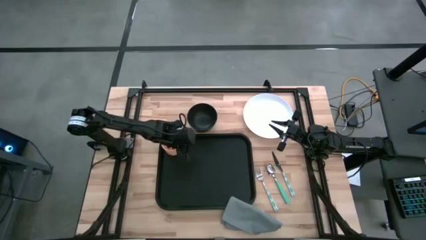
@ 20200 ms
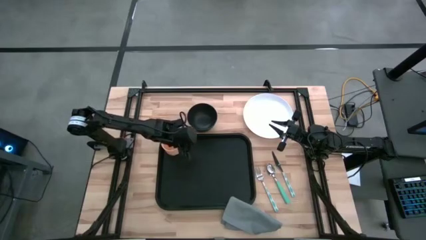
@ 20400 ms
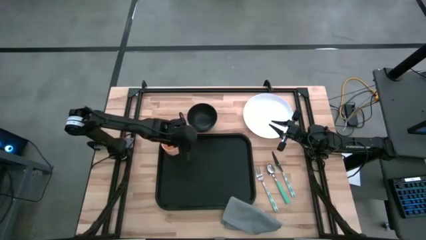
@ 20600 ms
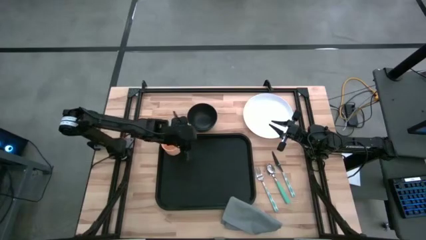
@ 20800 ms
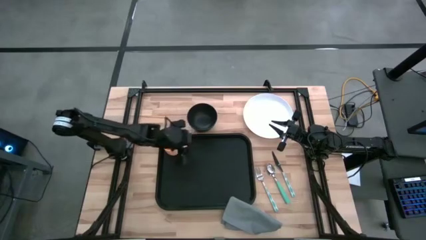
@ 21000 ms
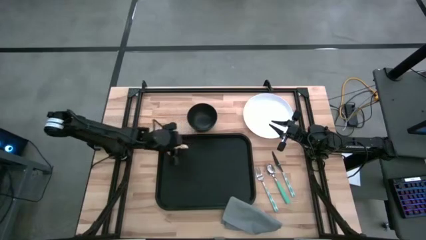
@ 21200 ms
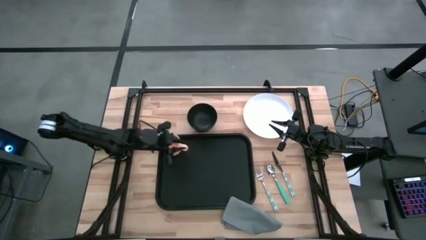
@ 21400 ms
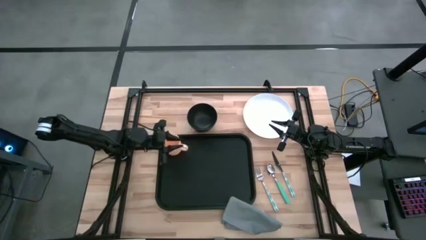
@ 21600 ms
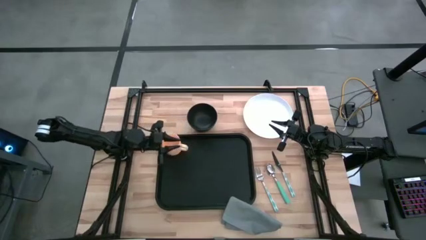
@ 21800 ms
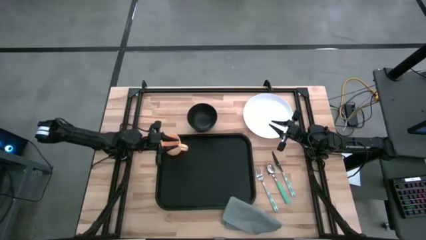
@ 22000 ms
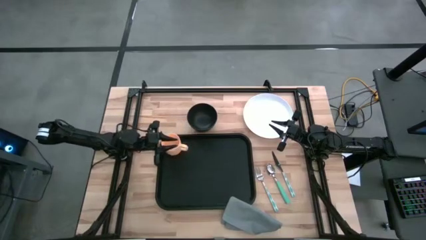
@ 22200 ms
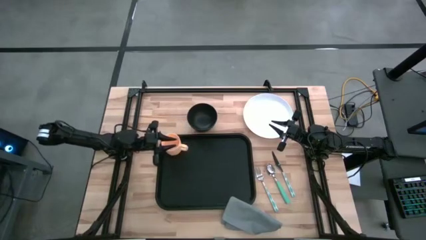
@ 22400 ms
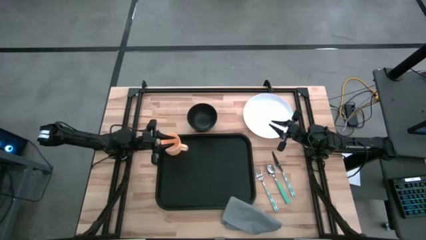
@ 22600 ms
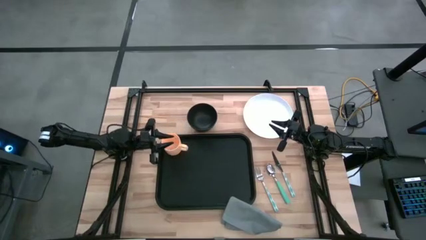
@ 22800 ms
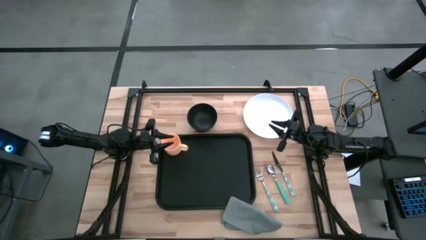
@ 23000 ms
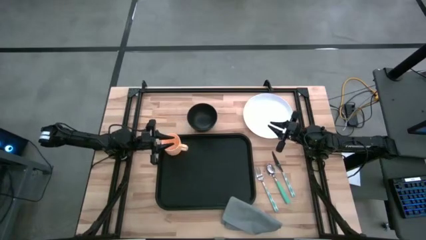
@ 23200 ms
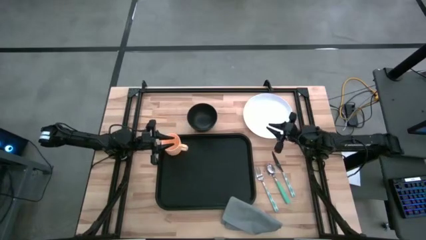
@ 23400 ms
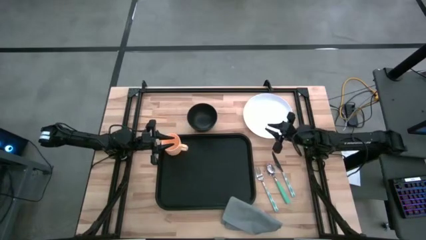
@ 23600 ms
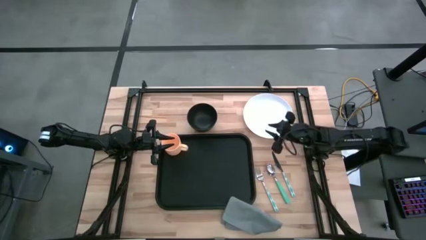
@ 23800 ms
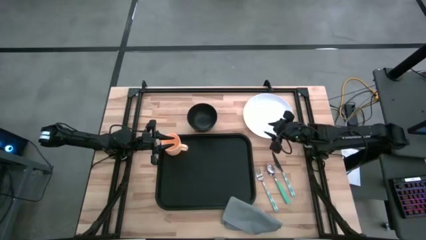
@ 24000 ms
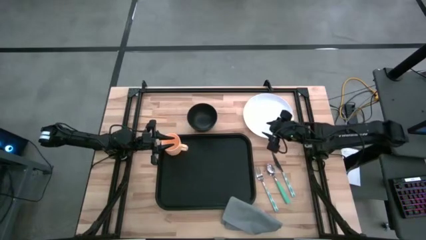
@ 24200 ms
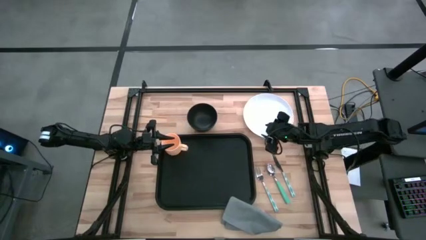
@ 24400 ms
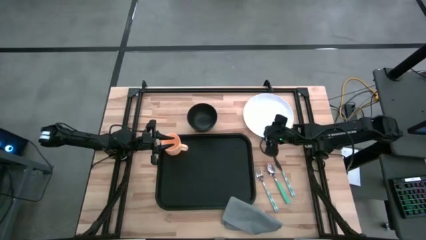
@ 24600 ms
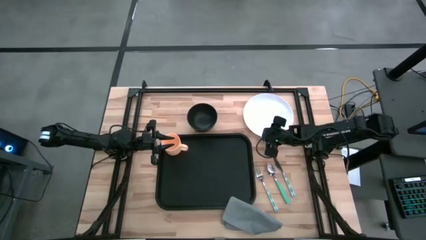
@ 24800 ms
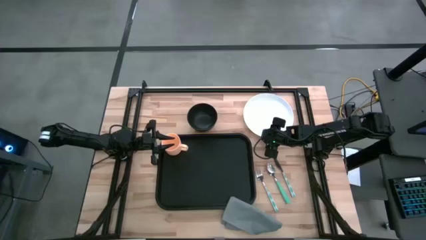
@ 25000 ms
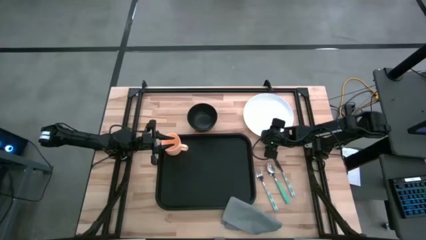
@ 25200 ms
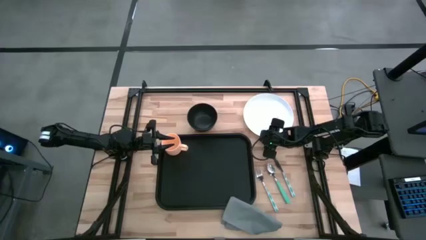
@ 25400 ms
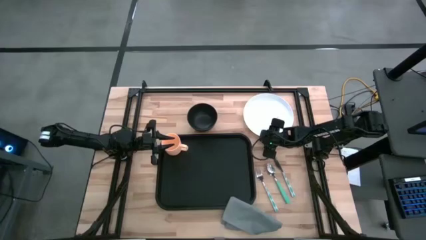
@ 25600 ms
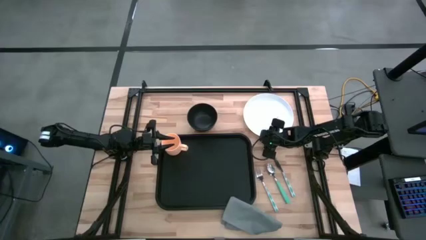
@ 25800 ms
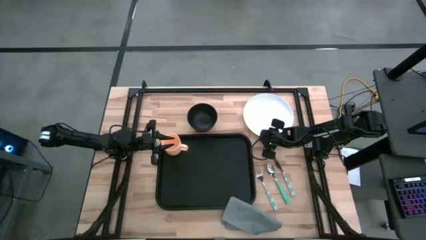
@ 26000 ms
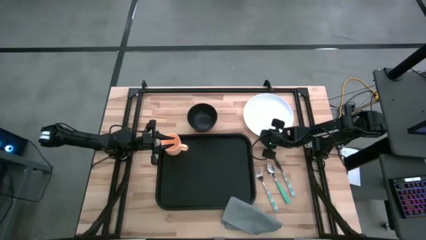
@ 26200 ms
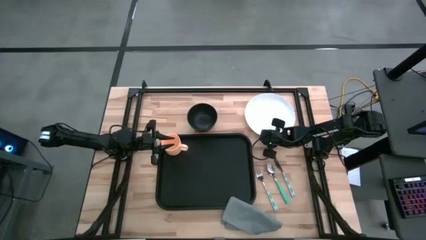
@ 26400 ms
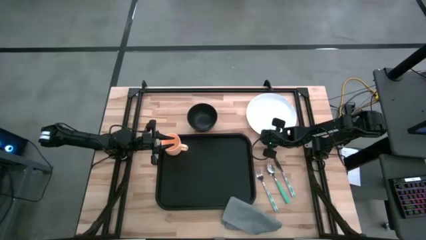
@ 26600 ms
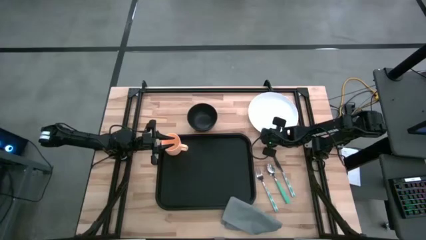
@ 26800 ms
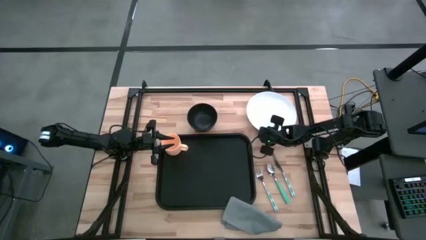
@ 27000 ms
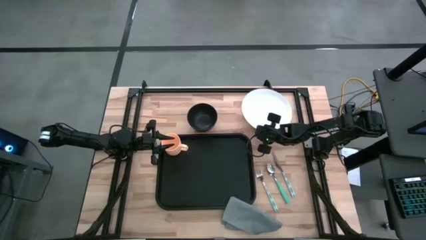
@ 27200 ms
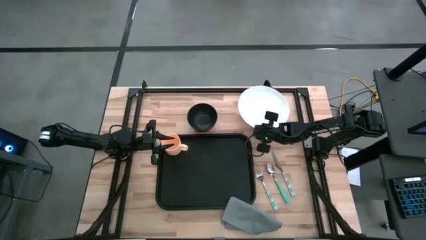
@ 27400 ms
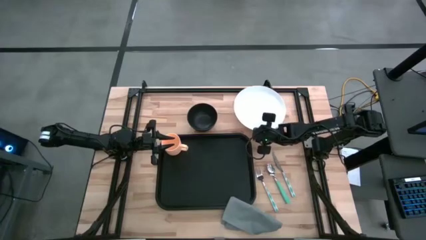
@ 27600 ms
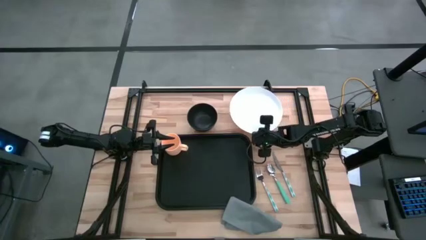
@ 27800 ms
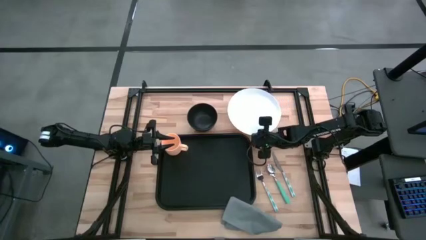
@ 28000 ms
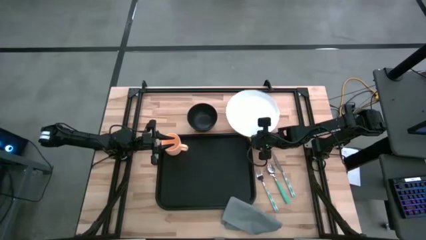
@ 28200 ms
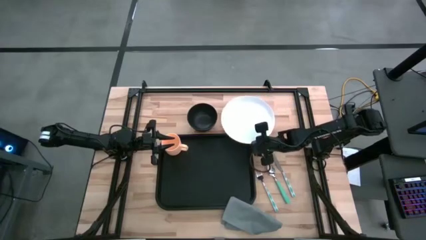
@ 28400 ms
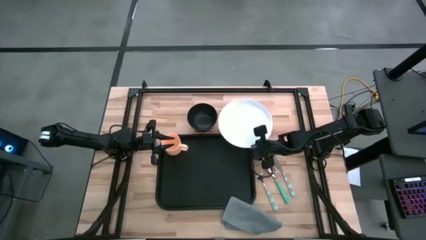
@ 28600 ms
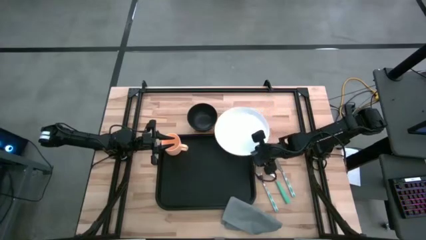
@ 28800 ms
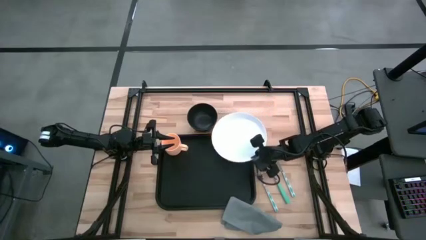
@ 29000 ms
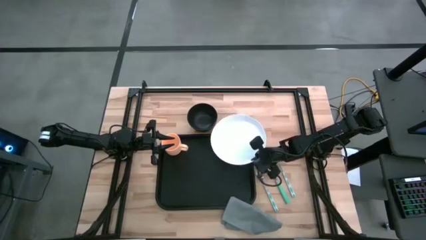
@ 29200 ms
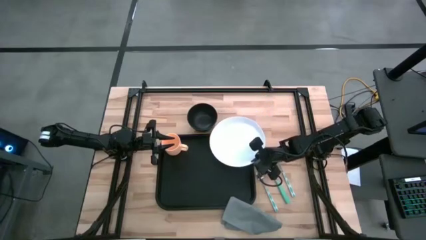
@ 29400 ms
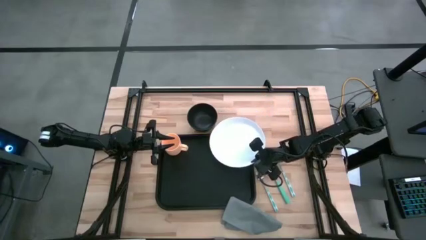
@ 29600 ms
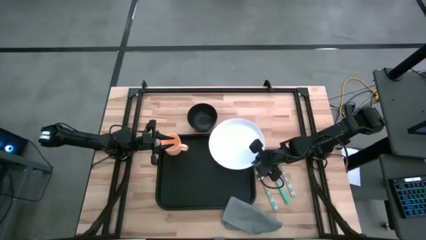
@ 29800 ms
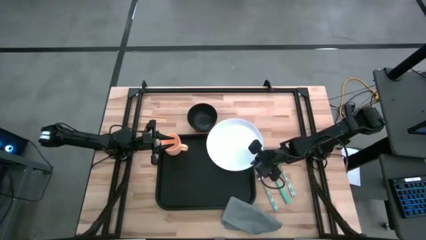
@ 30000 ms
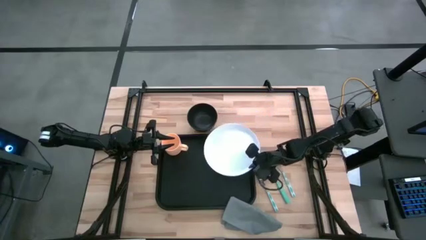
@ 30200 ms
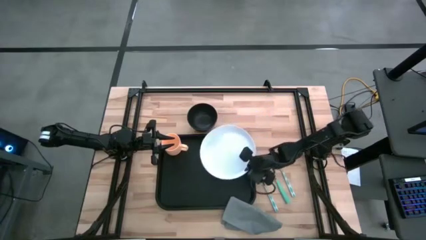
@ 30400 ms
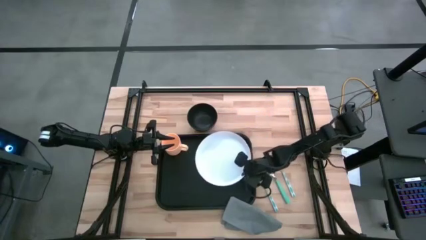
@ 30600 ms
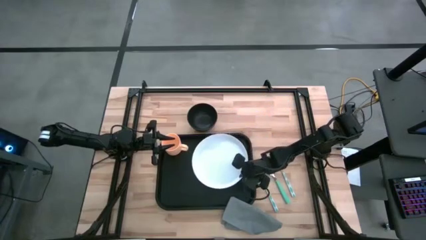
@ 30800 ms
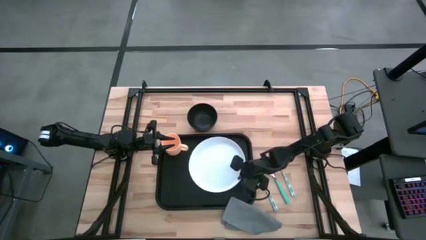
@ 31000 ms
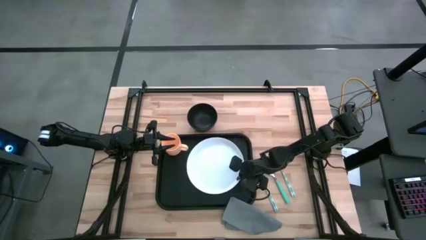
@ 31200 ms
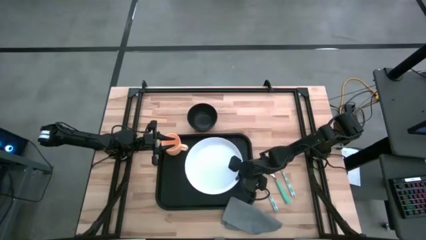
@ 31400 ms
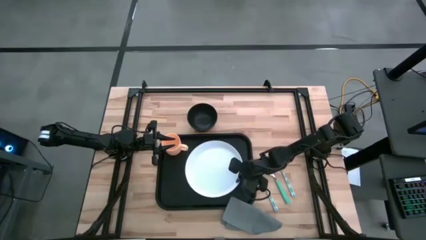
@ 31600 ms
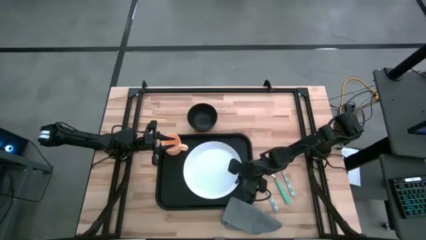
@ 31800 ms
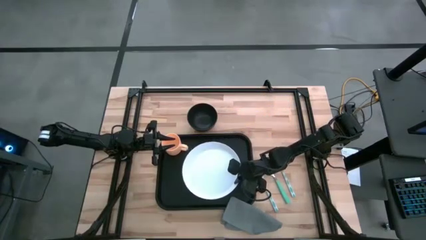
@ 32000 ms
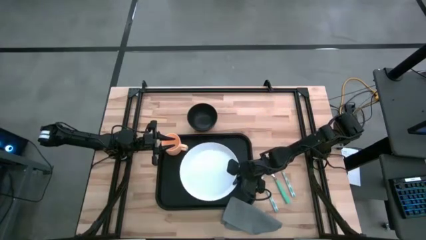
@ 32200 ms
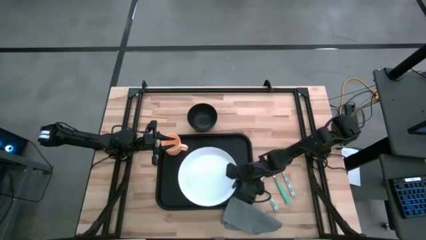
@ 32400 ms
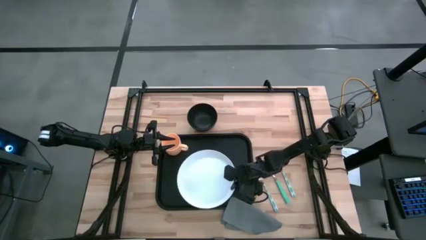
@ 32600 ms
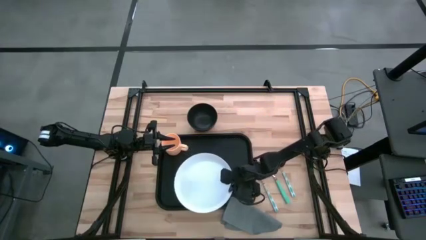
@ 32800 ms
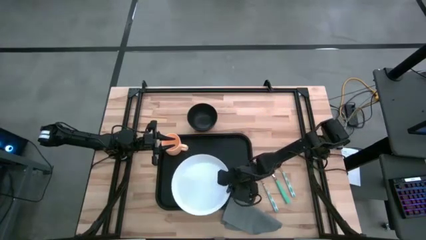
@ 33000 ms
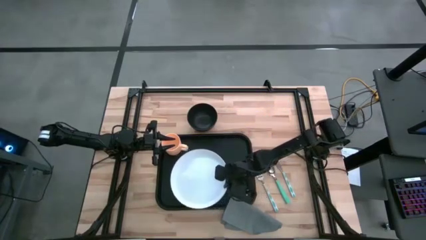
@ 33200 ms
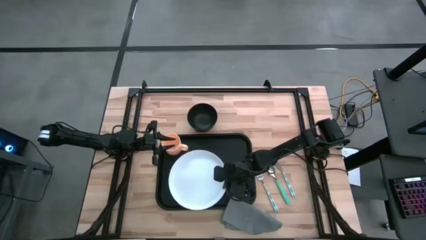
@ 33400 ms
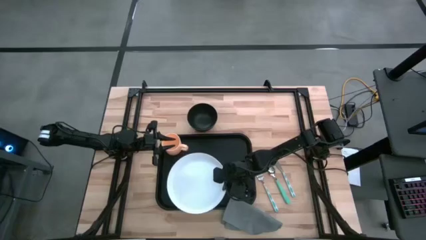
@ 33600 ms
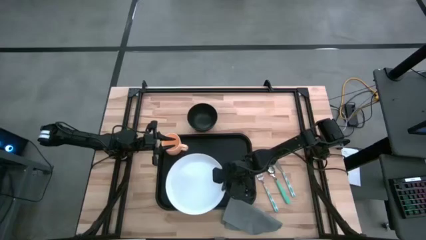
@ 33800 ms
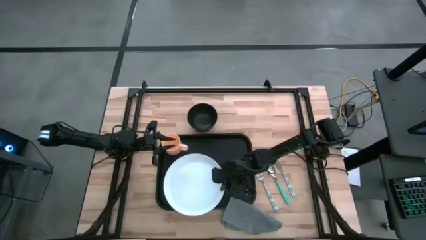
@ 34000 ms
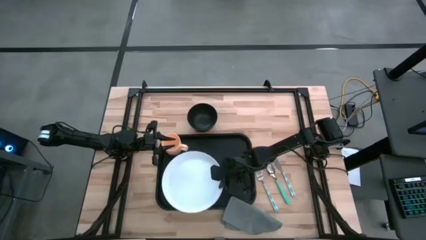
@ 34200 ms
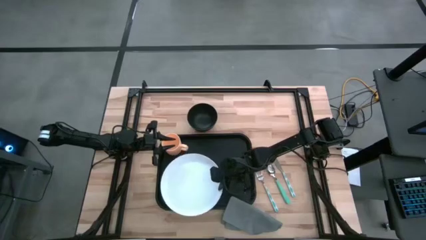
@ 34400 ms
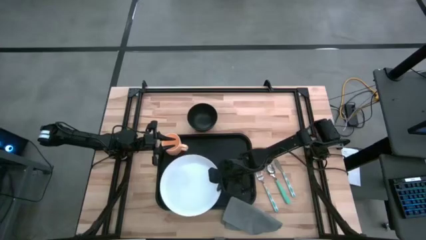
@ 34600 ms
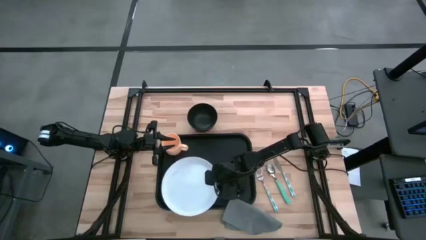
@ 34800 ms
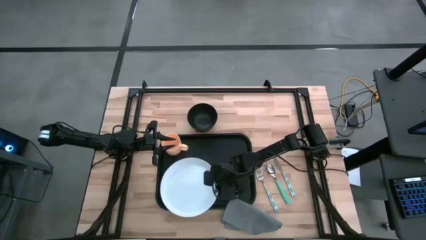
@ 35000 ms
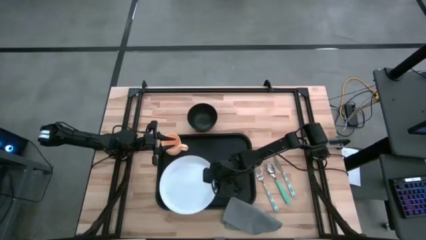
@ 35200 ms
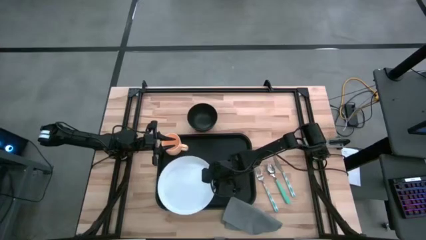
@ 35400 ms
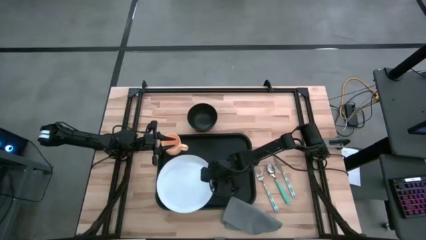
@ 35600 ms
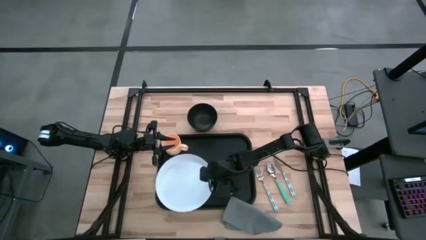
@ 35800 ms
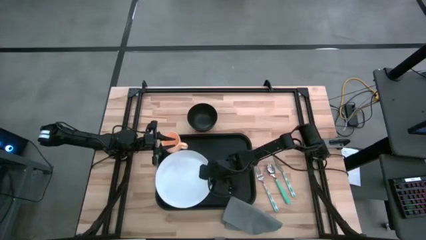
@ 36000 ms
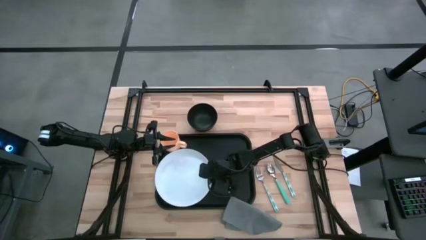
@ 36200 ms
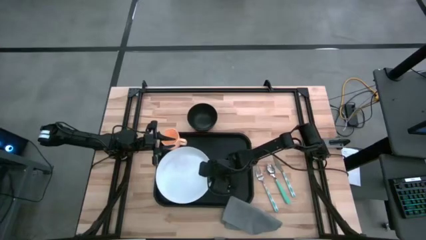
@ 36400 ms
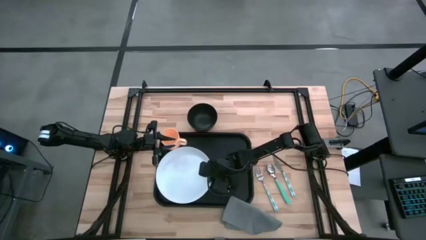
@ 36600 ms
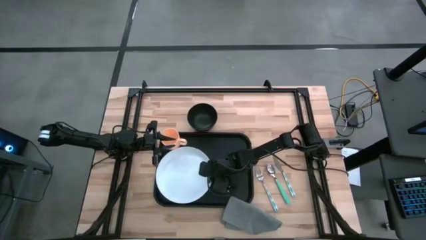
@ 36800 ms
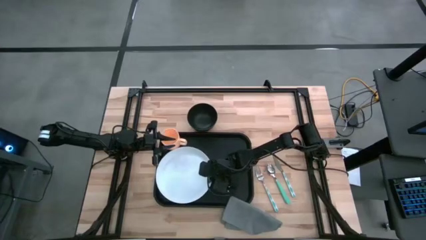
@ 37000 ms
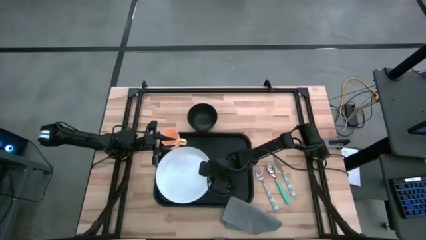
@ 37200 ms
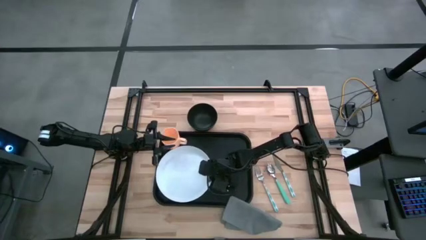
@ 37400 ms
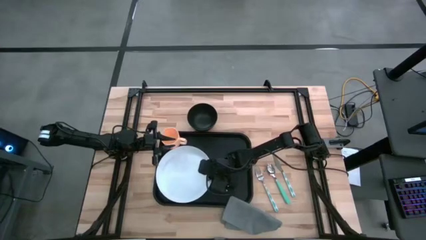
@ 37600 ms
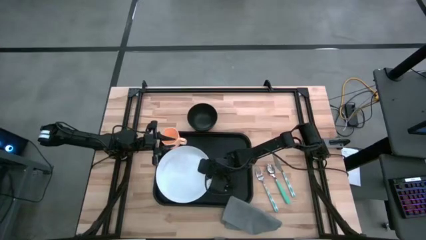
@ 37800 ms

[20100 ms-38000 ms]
Task: Set up tray
Put the plate to the bottom of the mug on the serving tray
